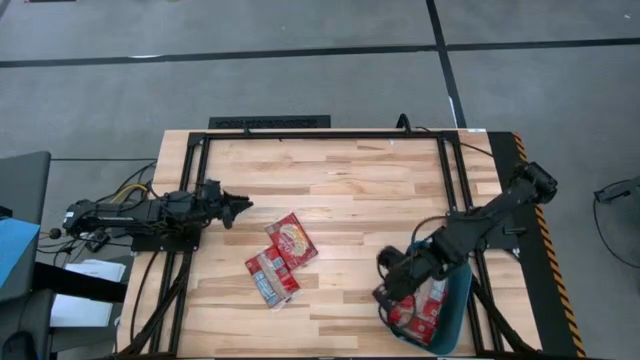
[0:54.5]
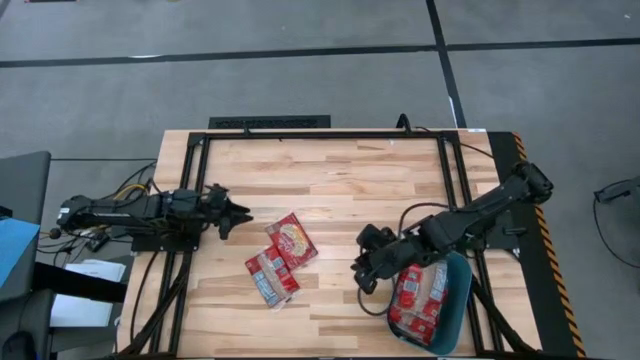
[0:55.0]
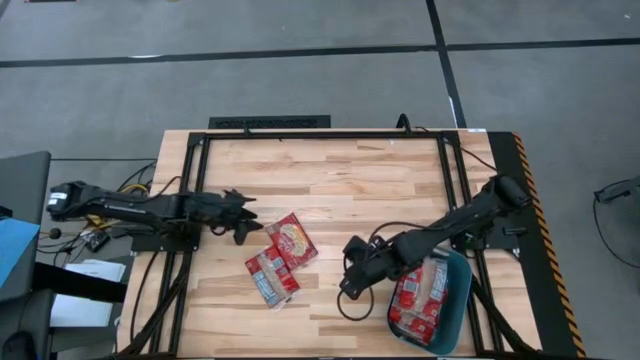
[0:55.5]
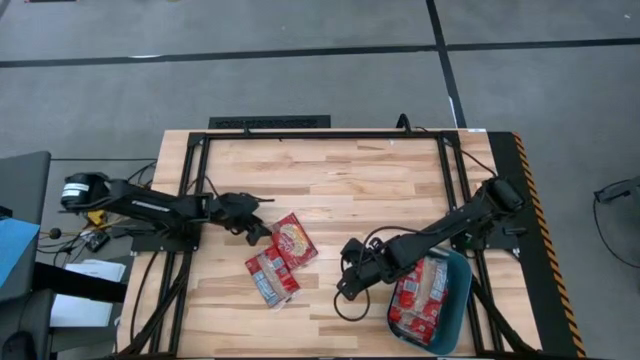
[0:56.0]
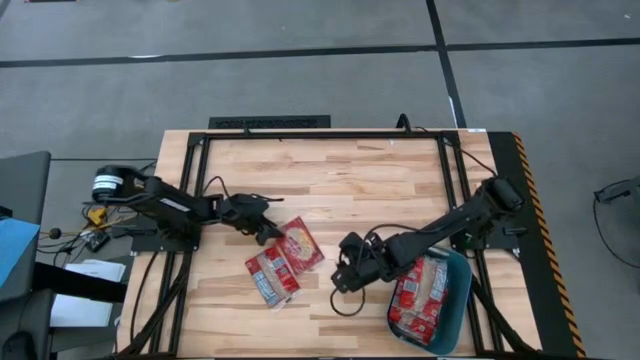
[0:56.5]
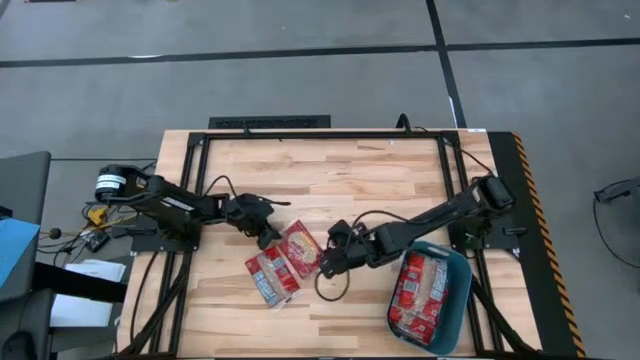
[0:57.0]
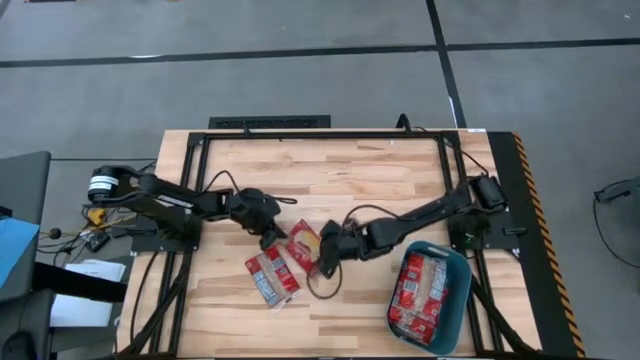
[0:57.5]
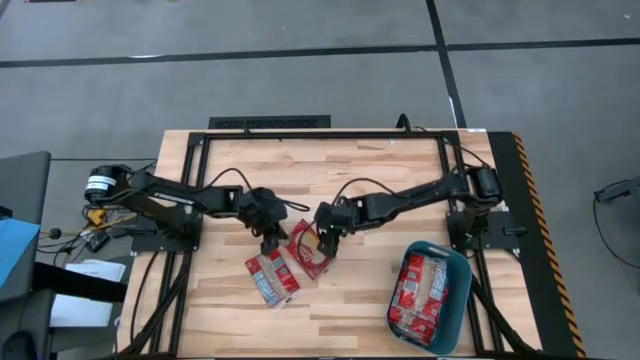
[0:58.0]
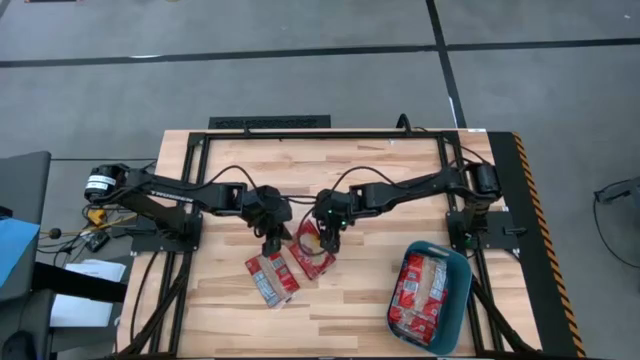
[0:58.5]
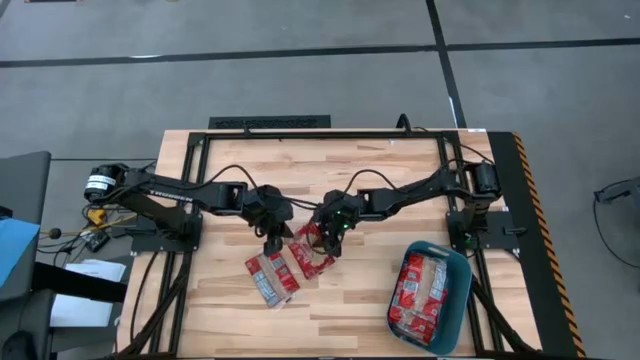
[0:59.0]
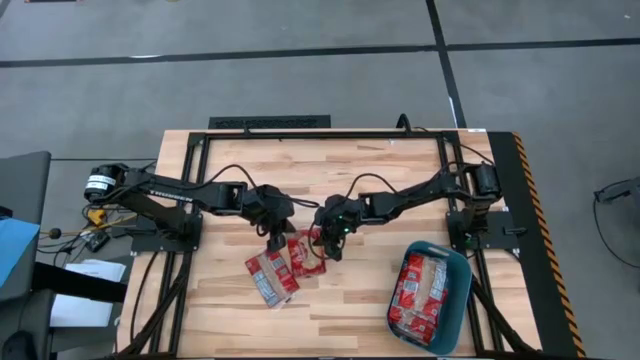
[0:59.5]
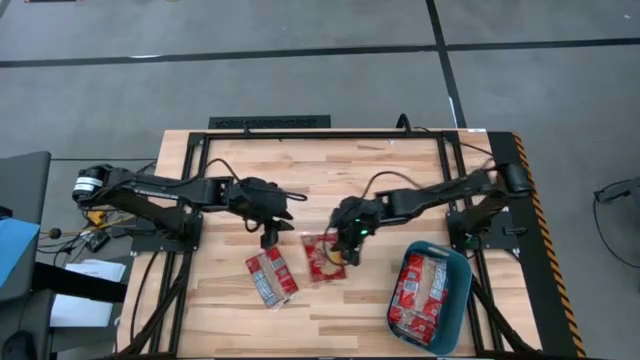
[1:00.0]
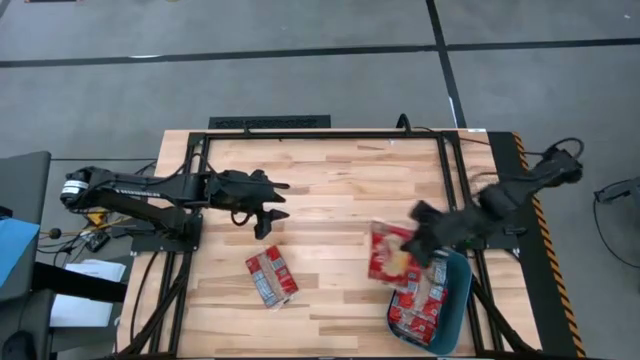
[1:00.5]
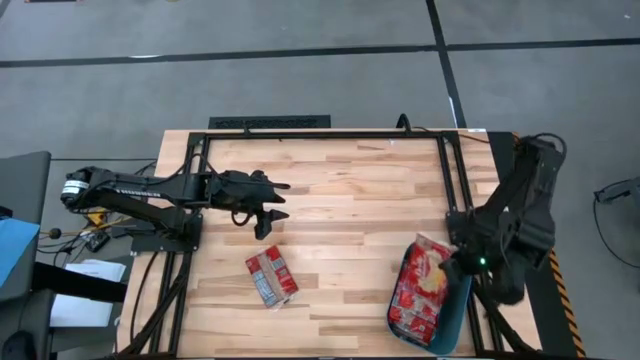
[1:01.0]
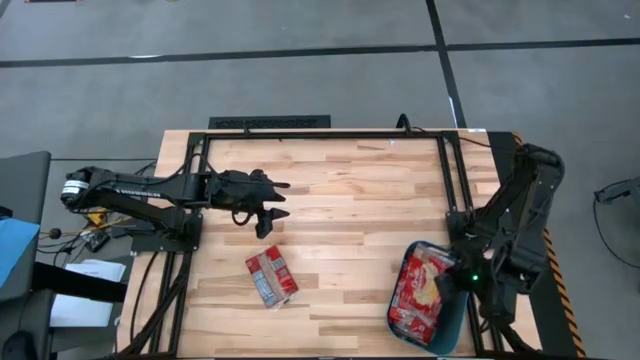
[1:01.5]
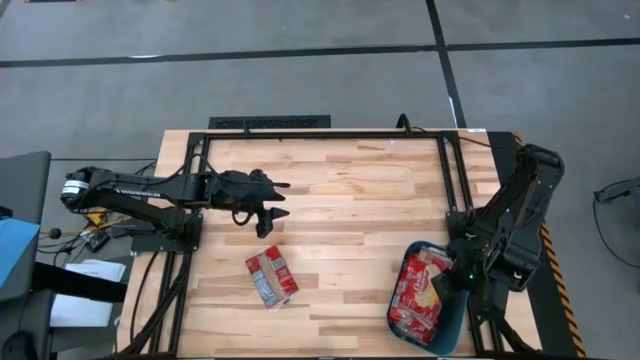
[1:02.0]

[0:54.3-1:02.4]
Task: Sort popcorn bags into baskets
Put the popcorn bag into the blue bin

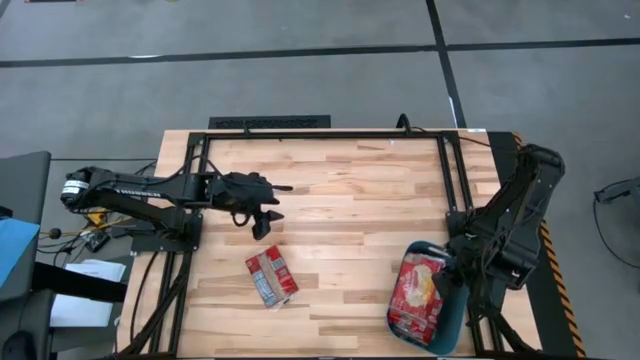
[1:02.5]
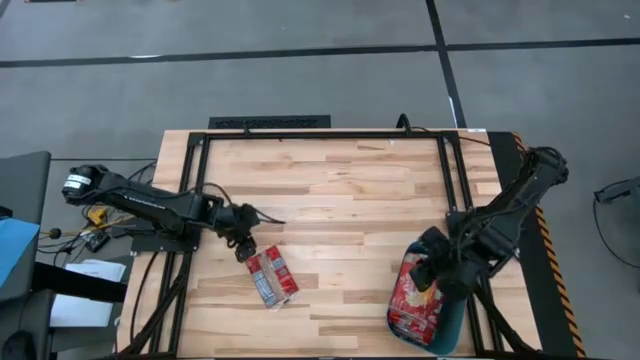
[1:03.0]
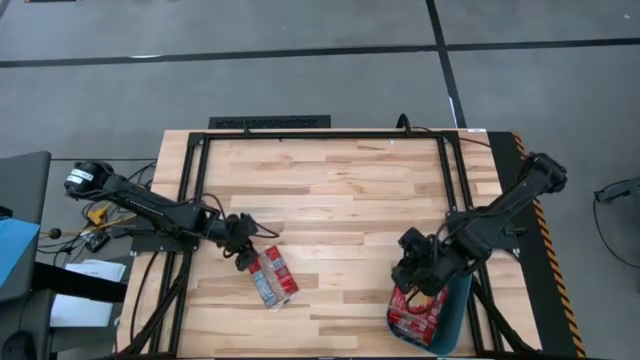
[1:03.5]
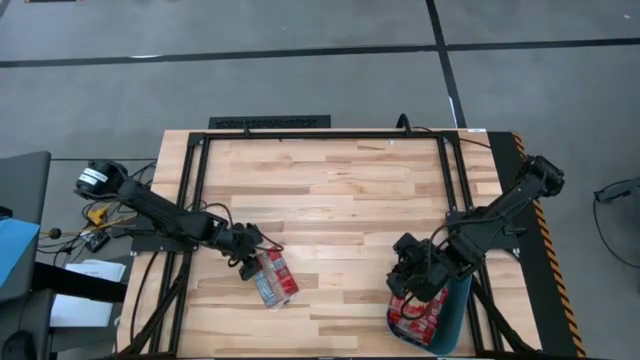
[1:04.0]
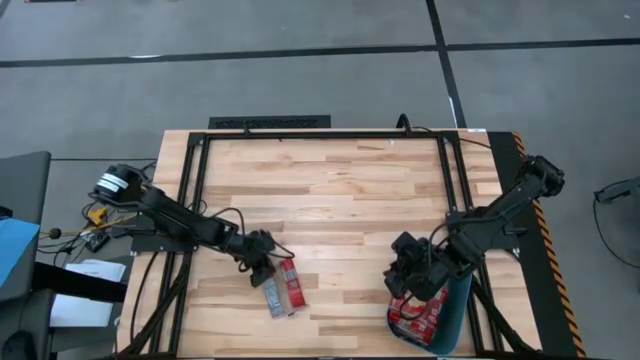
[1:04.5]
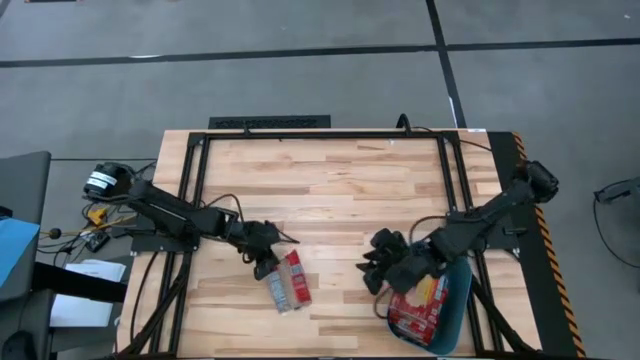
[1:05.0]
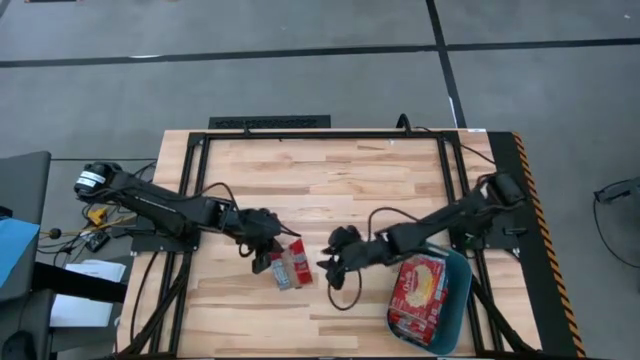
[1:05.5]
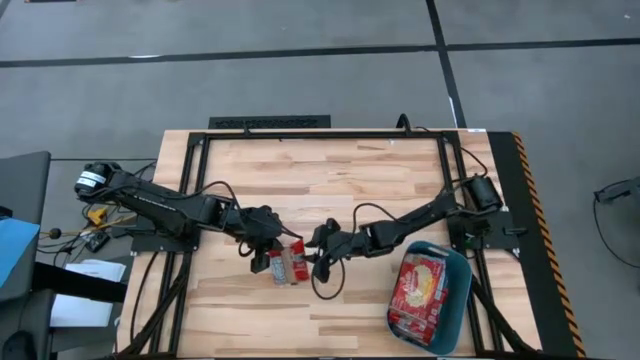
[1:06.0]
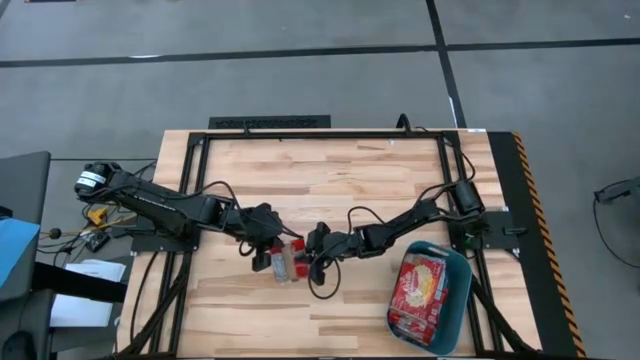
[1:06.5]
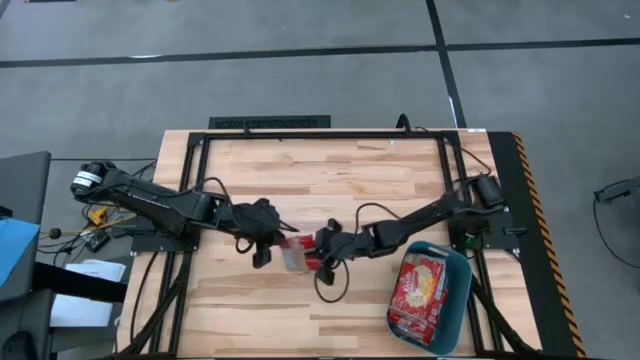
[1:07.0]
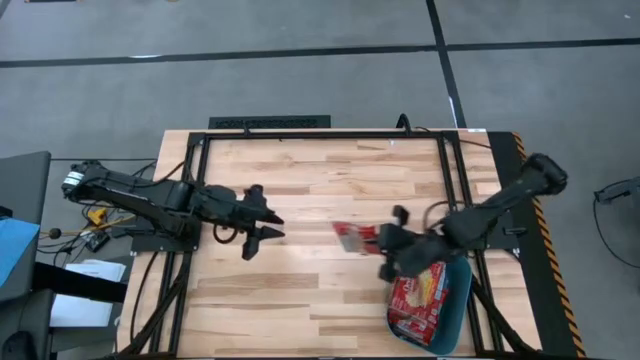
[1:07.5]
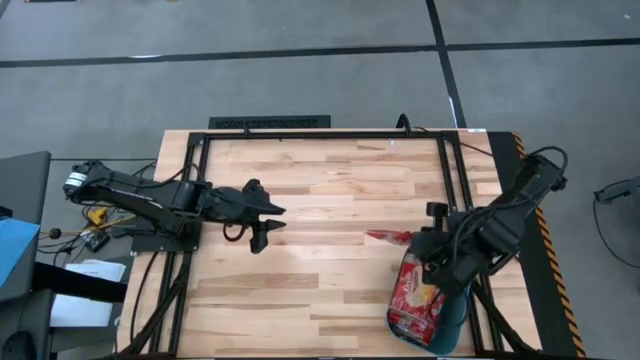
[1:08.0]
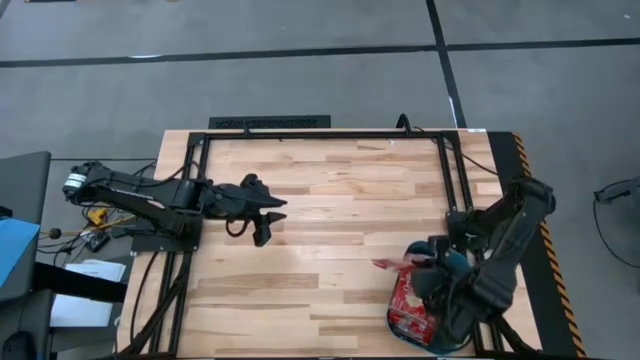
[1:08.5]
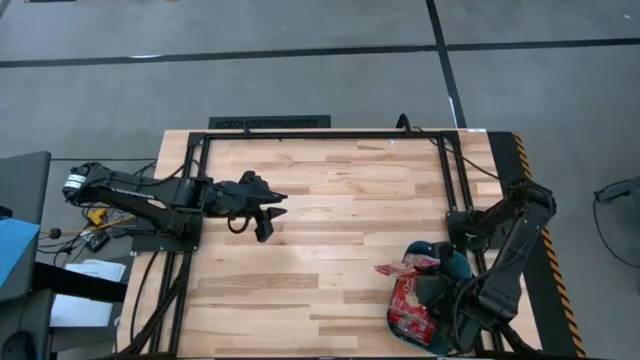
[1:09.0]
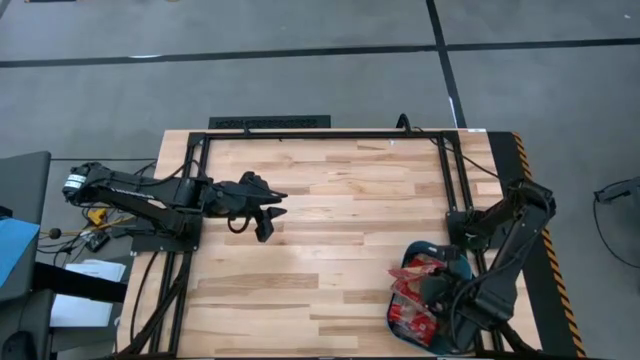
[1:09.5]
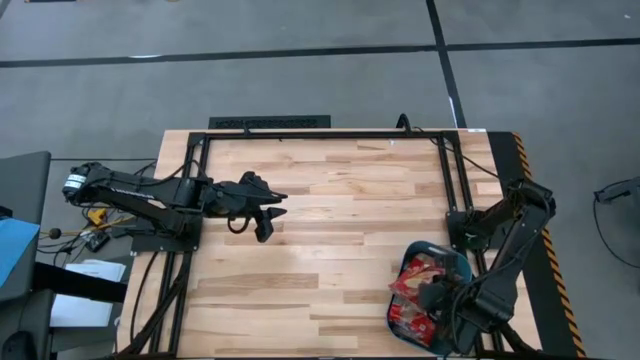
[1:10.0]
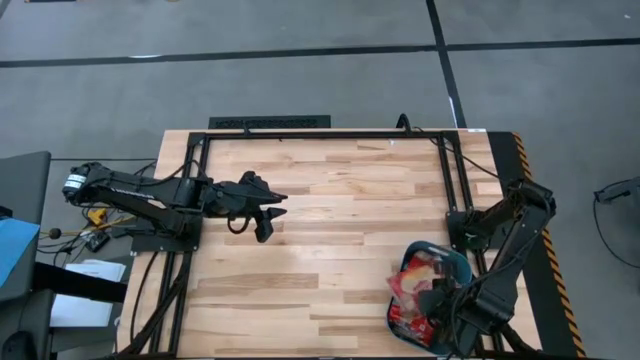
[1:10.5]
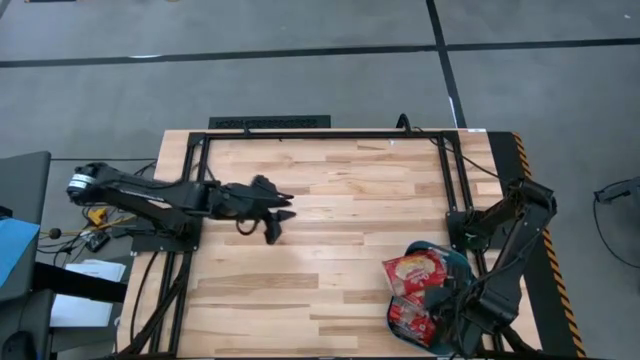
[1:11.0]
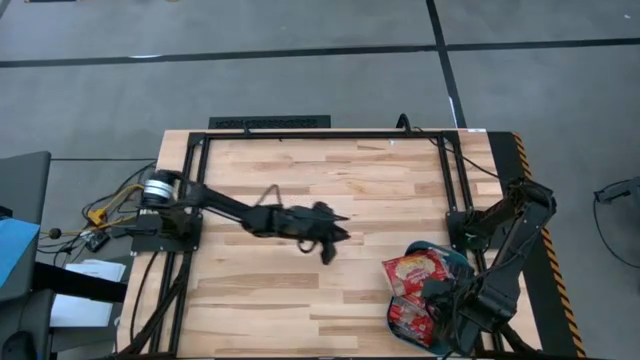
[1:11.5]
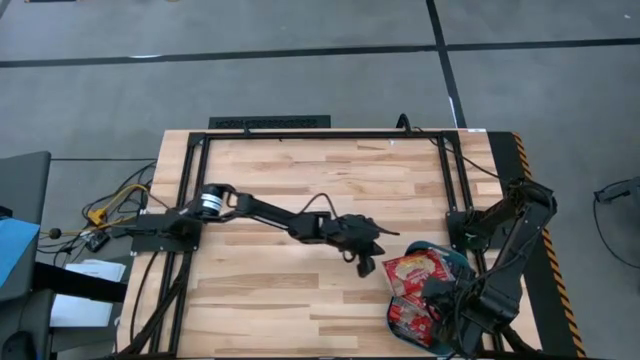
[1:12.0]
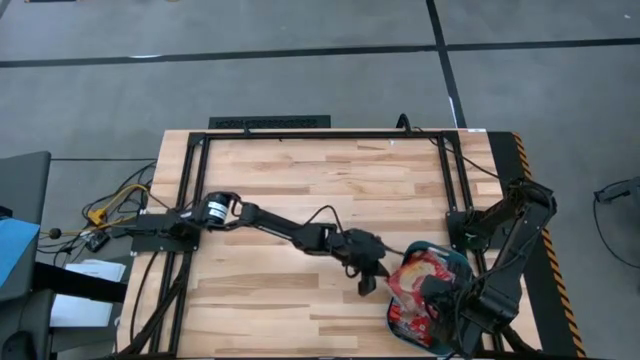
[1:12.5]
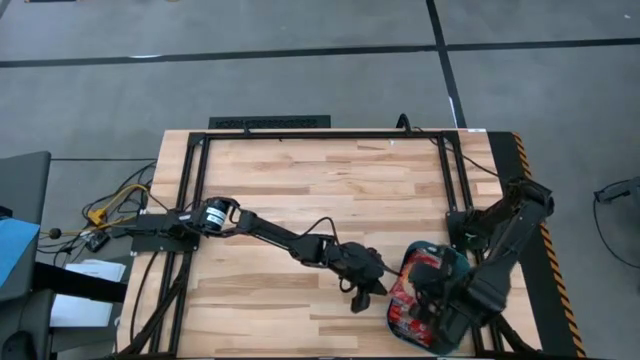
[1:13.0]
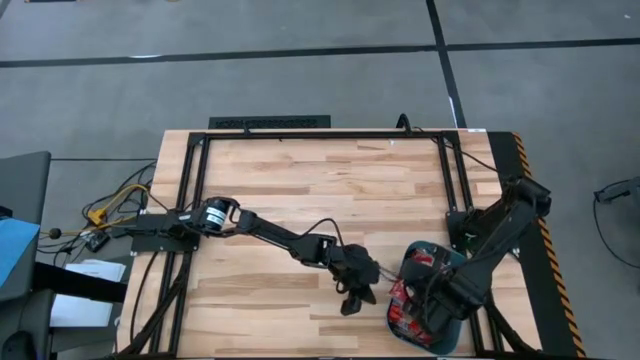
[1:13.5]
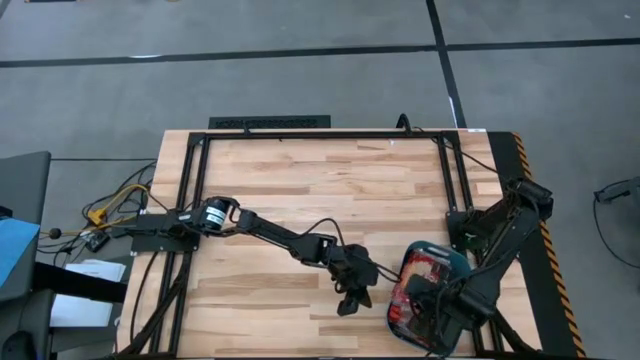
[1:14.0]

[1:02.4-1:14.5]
Put the popcorn bag into the blue bin
